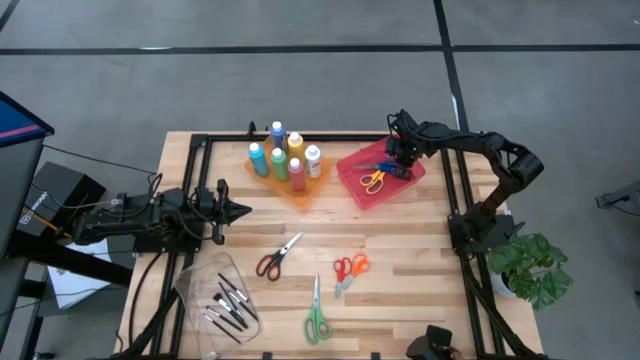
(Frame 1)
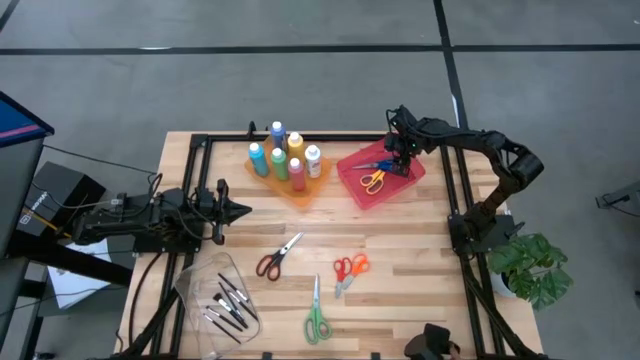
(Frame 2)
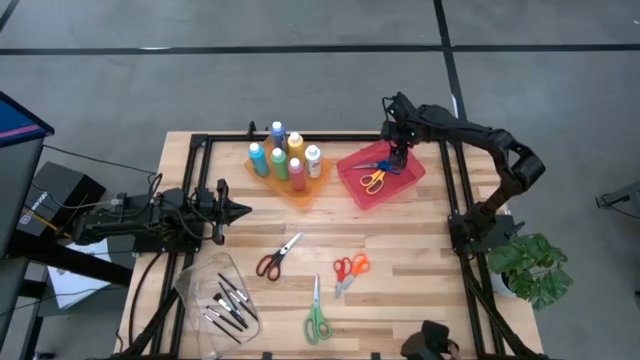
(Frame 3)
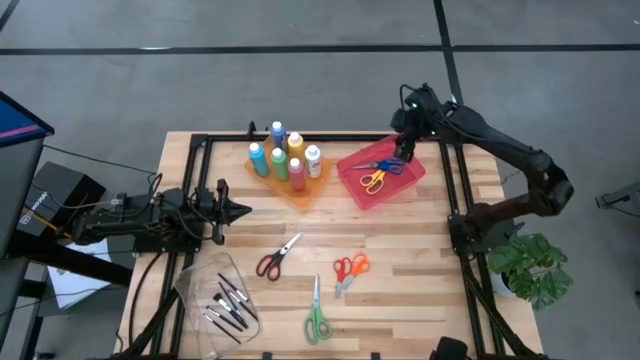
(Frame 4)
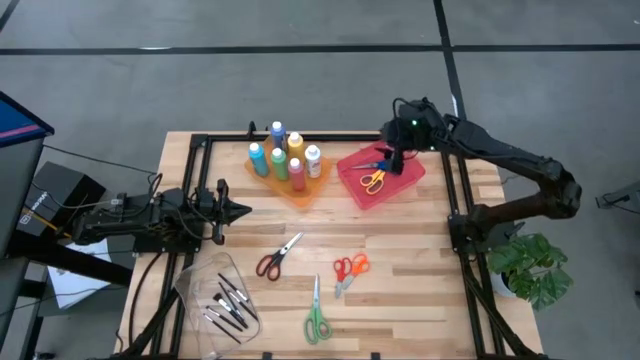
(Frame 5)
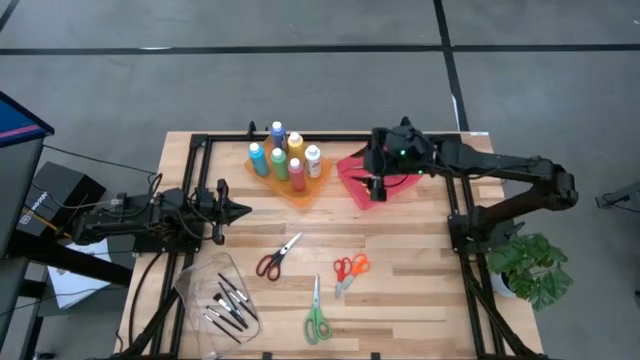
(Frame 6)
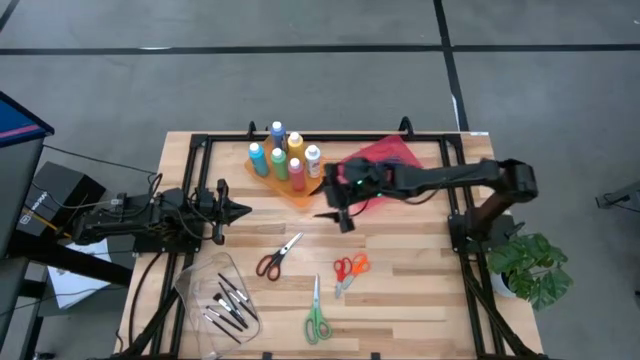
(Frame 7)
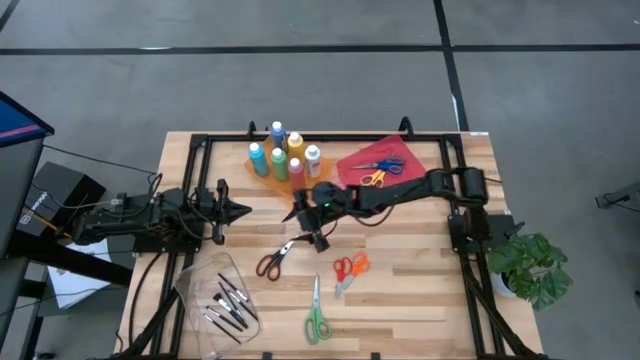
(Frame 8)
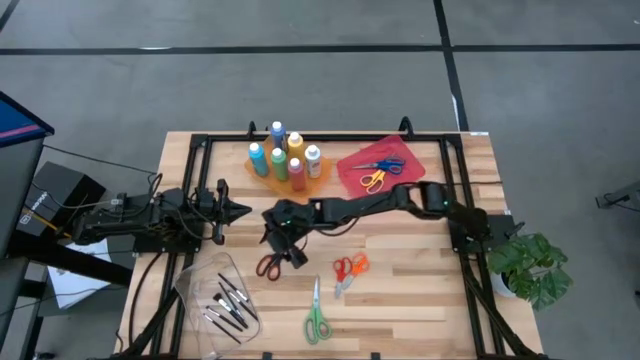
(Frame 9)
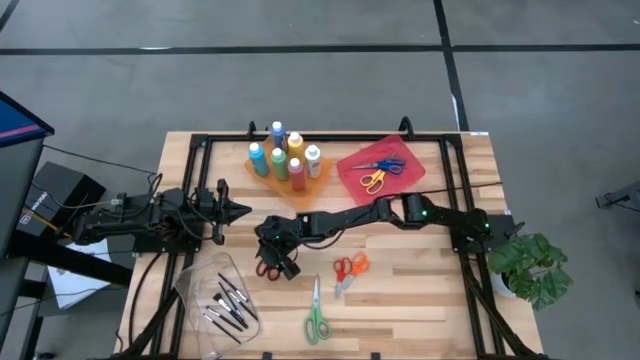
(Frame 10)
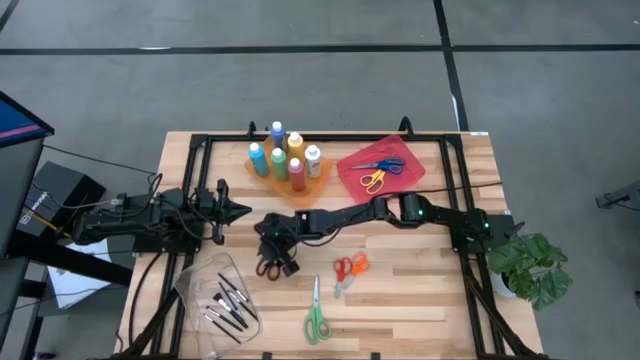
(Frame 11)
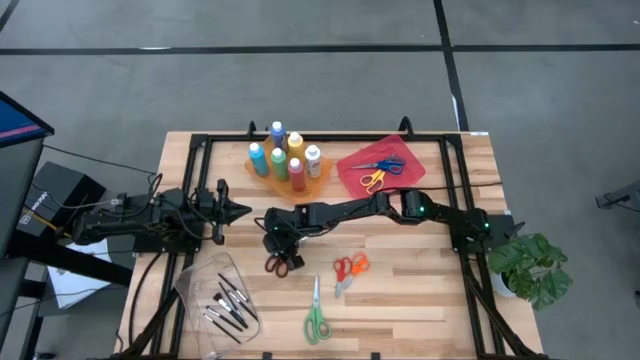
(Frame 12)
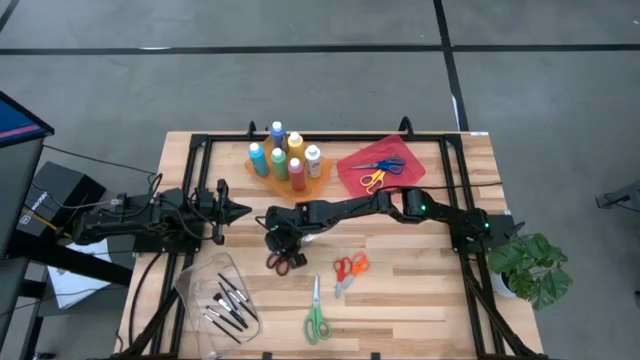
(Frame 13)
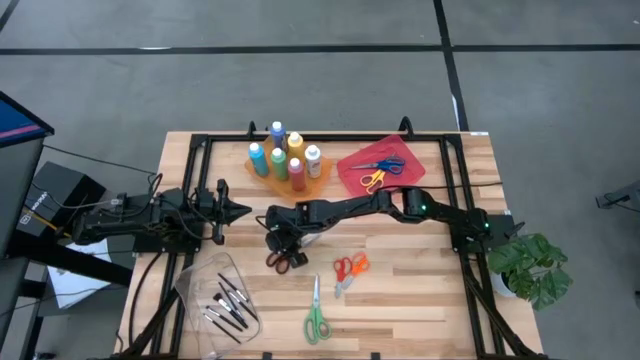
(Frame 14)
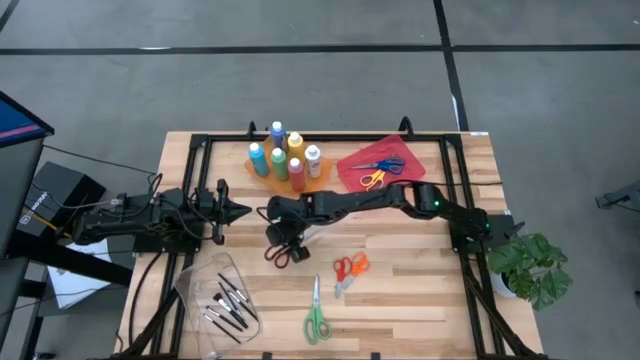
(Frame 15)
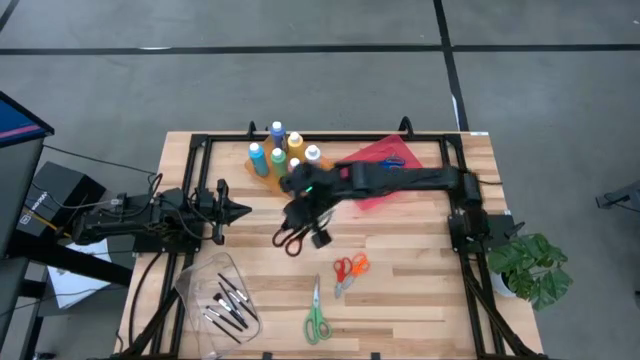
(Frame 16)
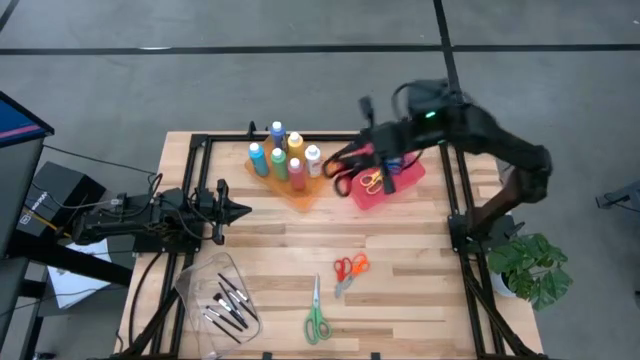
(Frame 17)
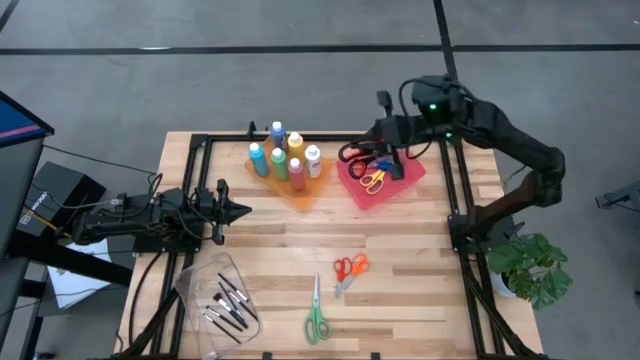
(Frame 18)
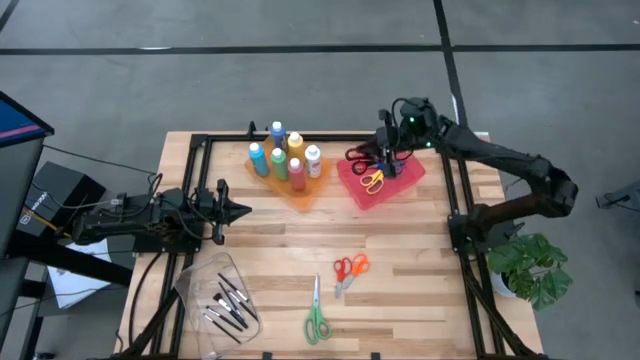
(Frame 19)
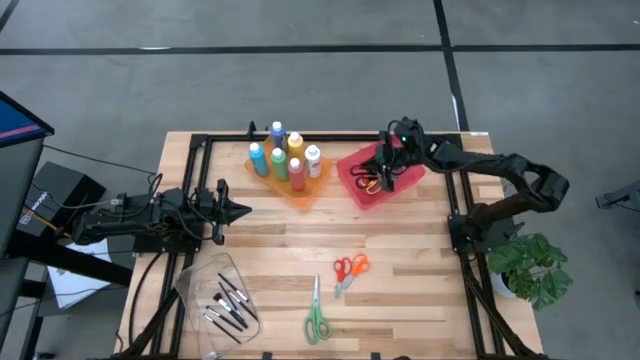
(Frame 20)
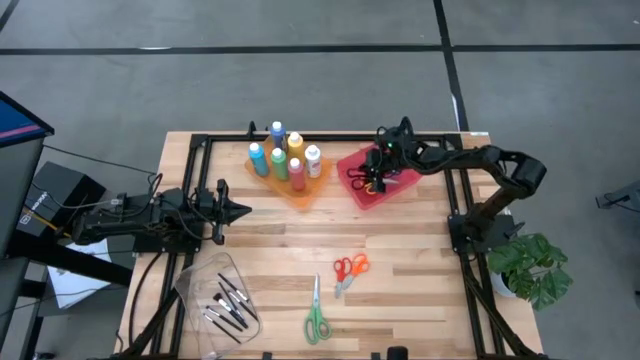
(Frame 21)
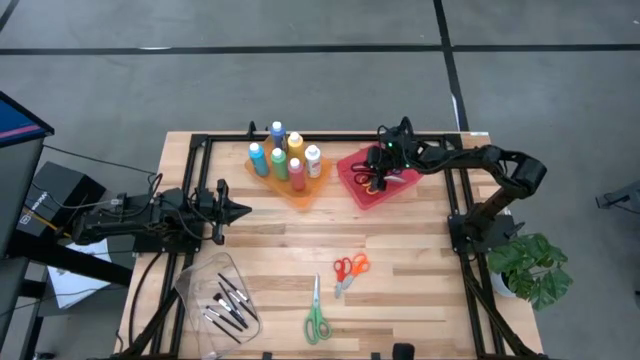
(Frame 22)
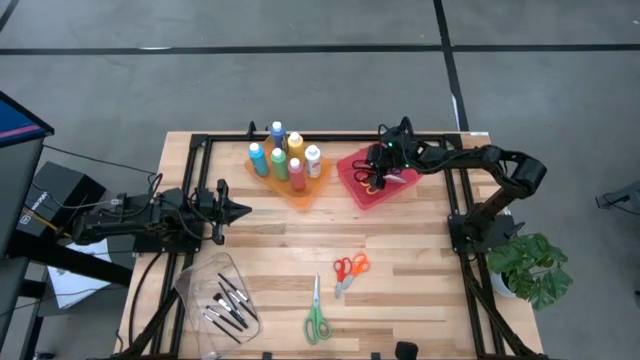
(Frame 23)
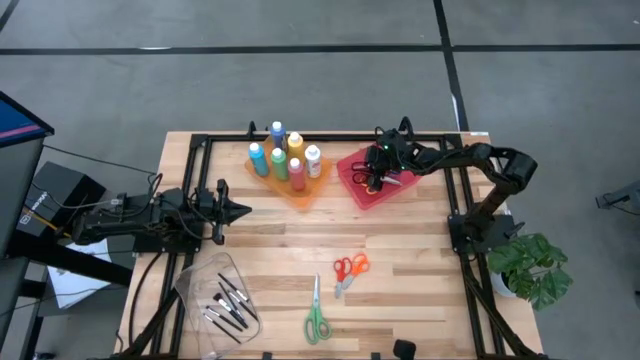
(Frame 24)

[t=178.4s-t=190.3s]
Task: Pick & Place Paint Supplies
Put the black scissors into the pink bin

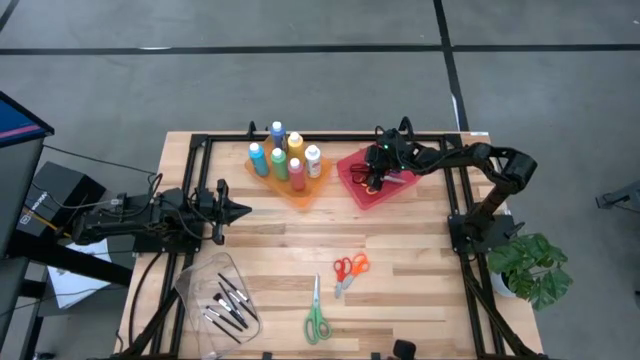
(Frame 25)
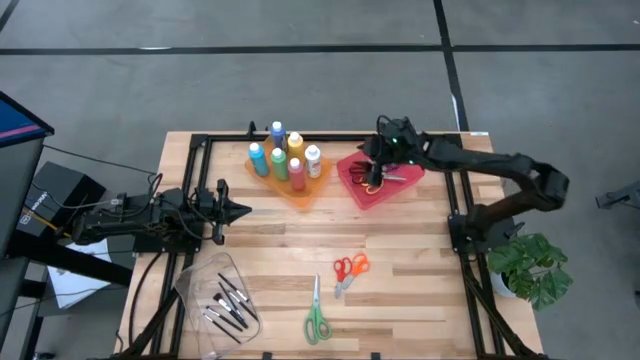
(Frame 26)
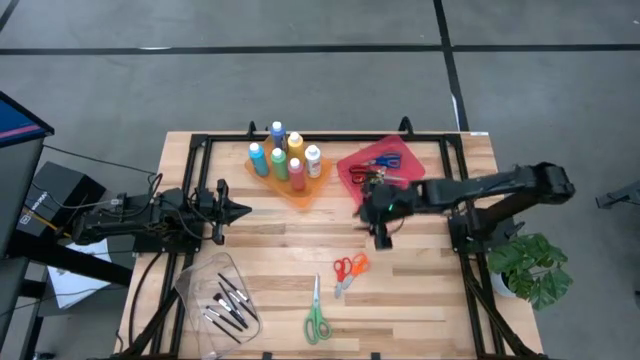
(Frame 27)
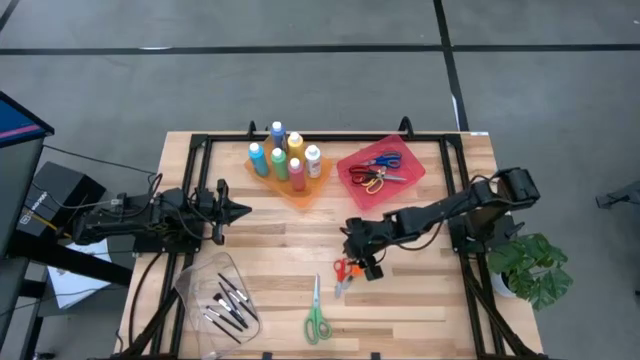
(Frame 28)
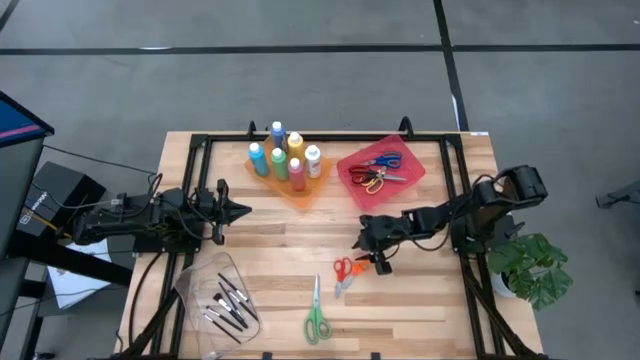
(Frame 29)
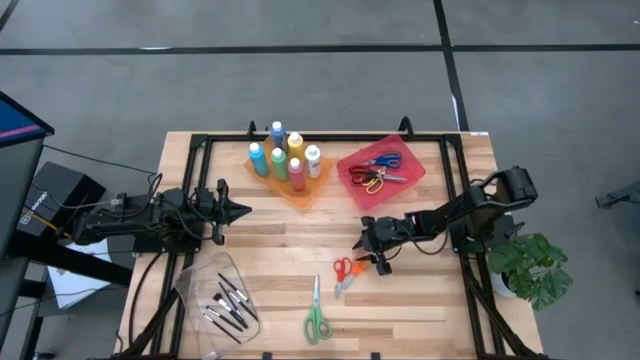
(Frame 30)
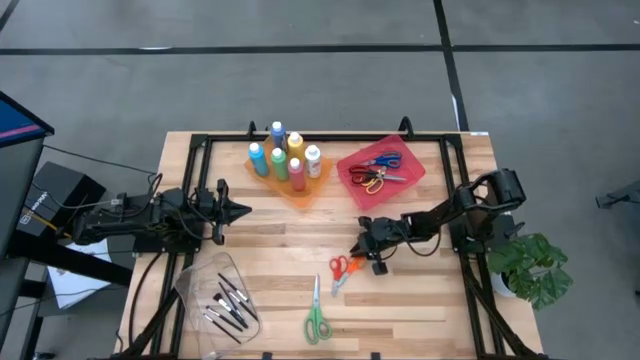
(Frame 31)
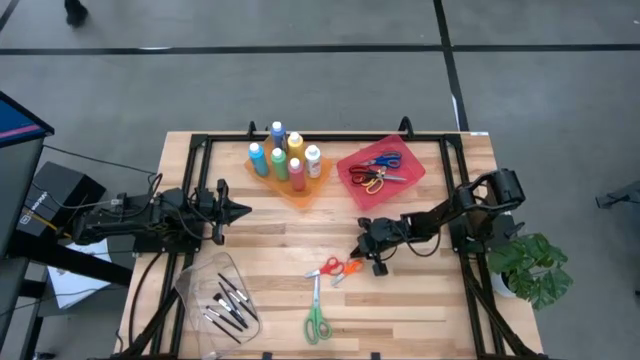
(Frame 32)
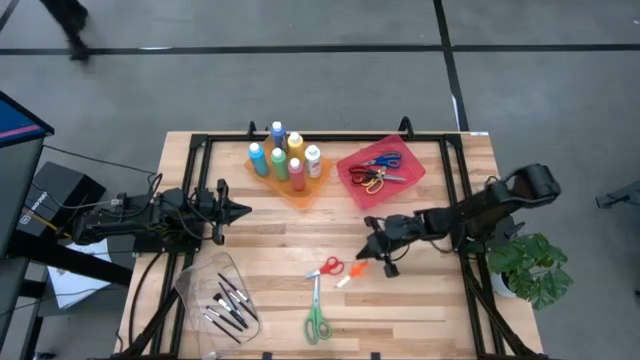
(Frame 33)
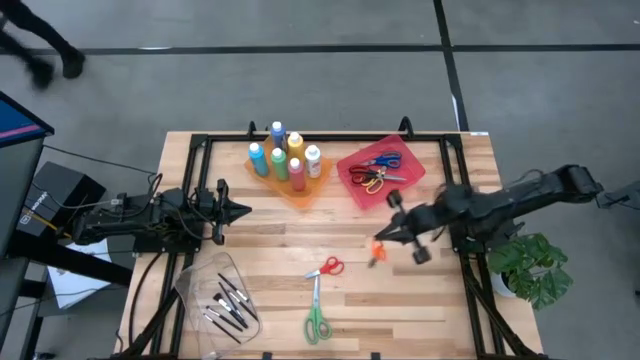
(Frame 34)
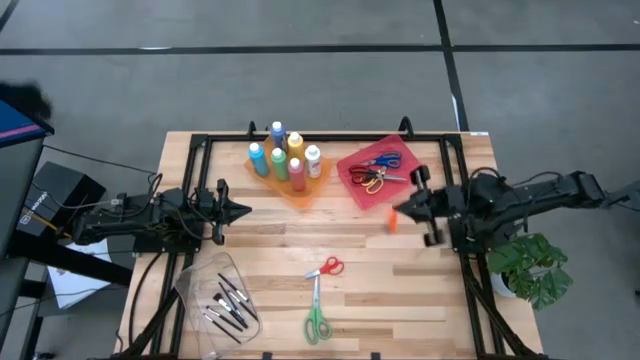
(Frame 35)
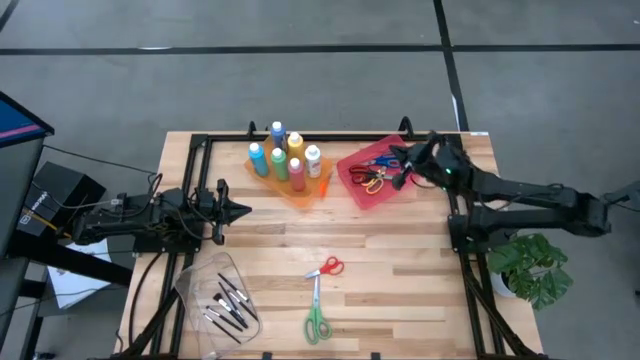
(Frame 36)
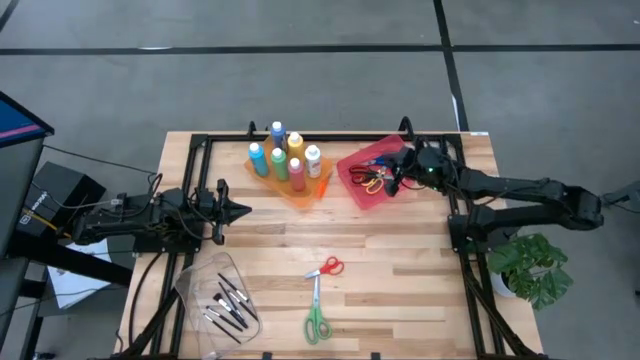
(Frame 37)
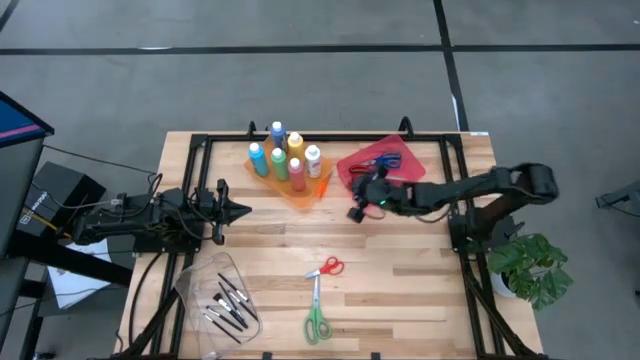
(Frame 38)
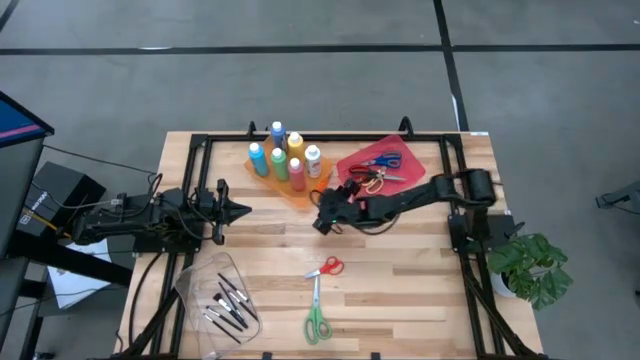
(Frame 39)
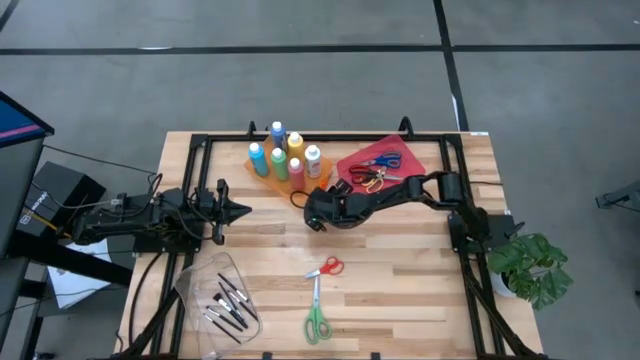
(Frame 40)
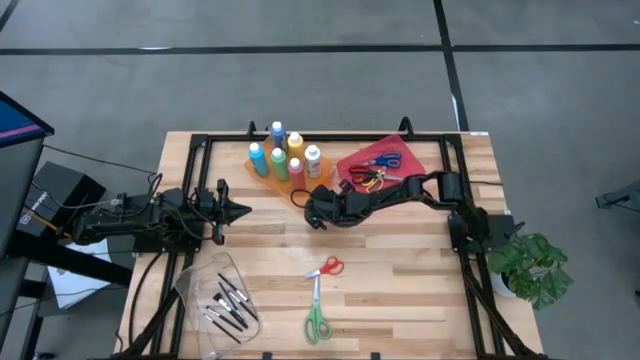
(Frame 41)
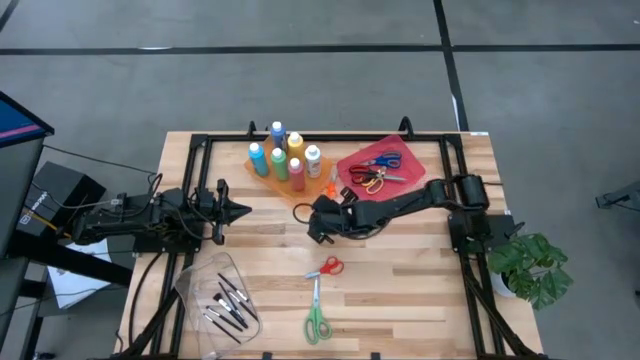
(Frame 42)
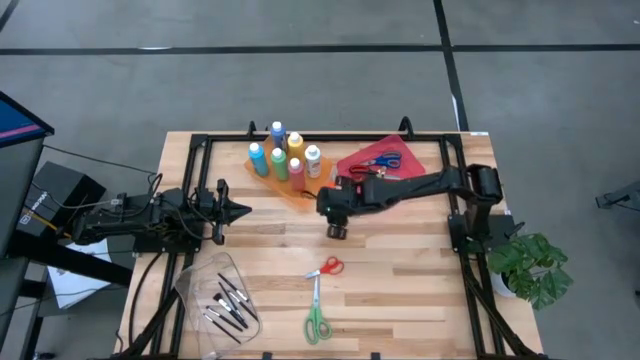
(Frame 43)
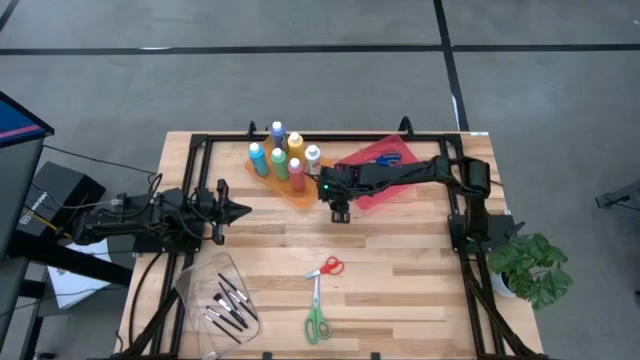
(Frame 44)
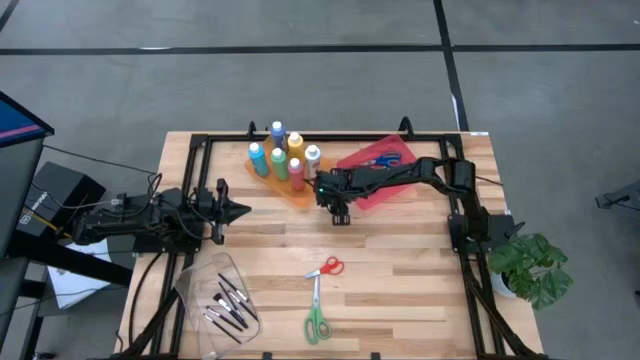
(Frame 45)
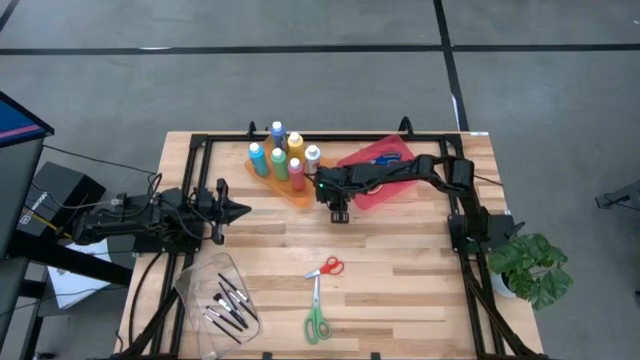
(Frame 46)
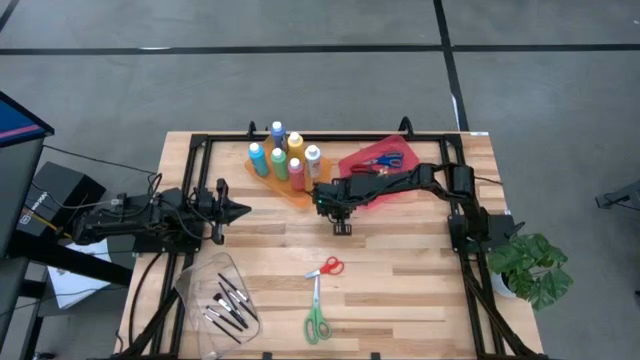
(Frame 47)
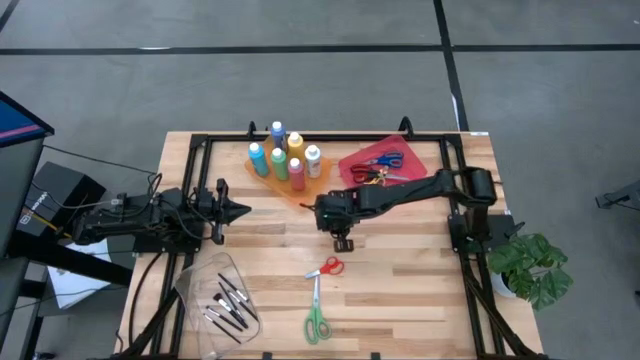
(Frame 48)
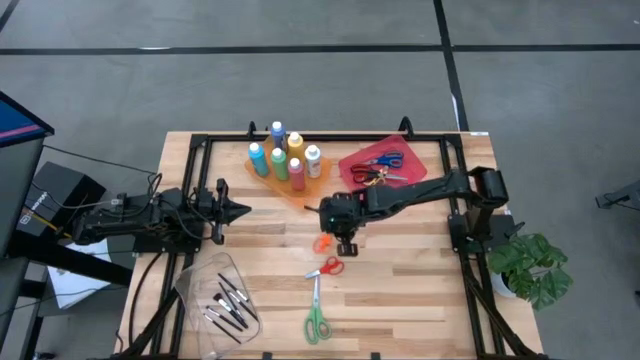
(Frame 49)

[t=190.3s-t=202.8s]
Put the orange scissors into the pink bin
